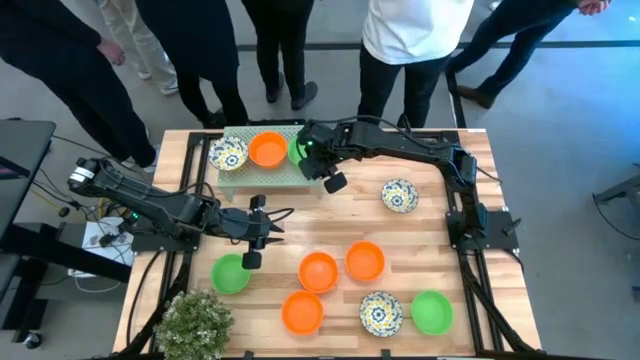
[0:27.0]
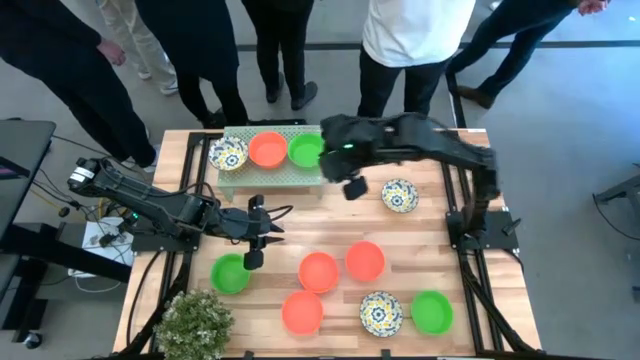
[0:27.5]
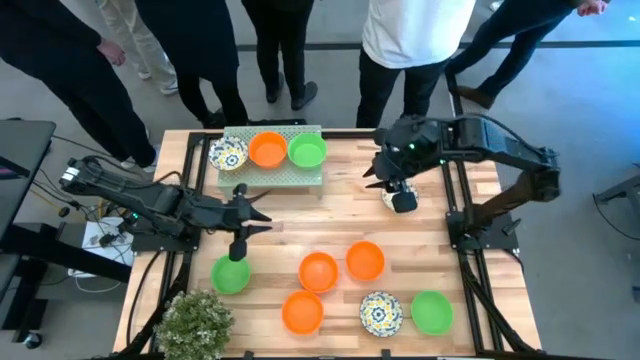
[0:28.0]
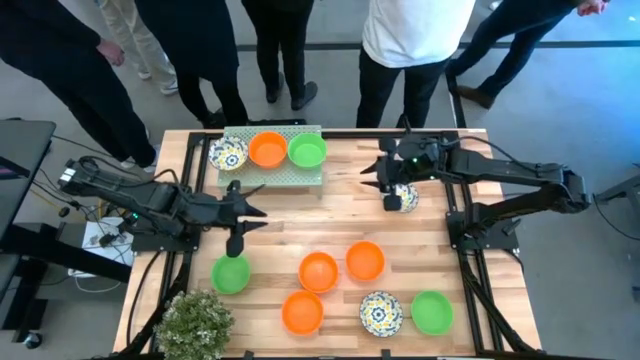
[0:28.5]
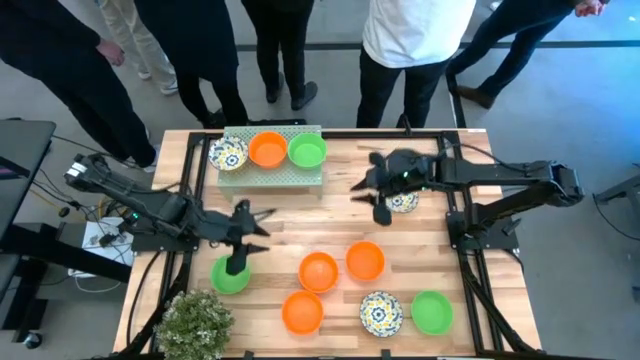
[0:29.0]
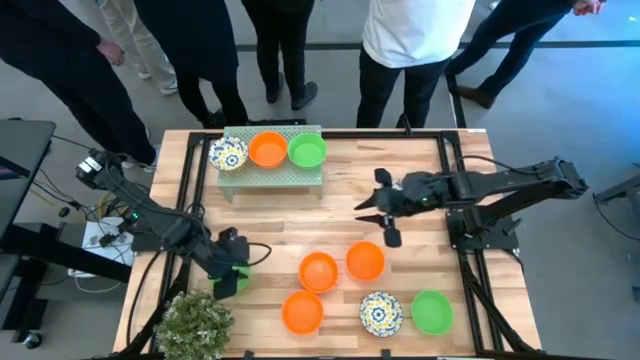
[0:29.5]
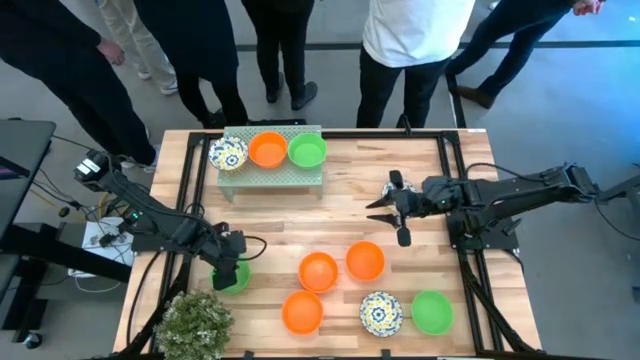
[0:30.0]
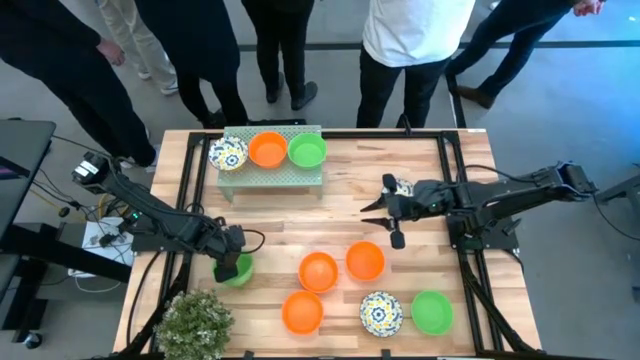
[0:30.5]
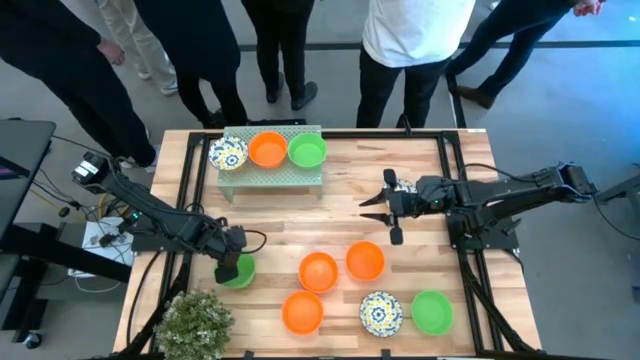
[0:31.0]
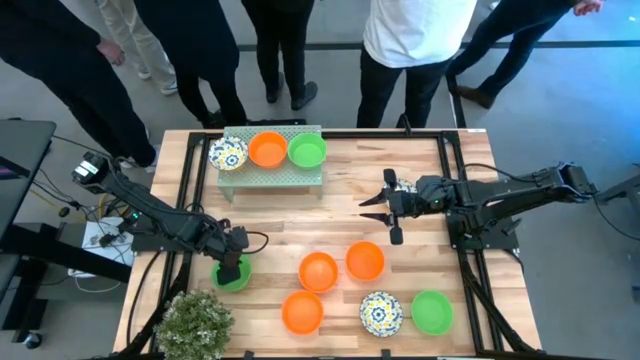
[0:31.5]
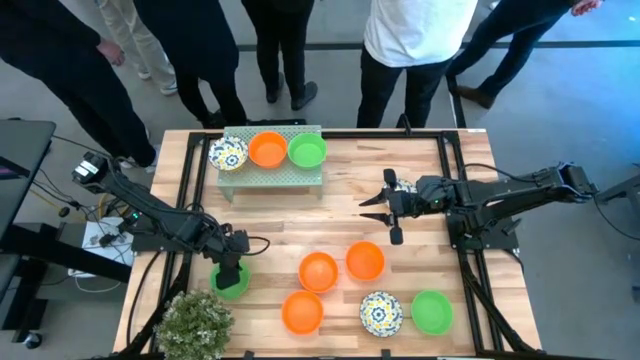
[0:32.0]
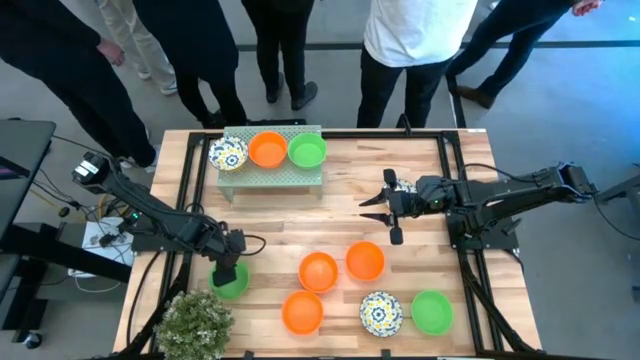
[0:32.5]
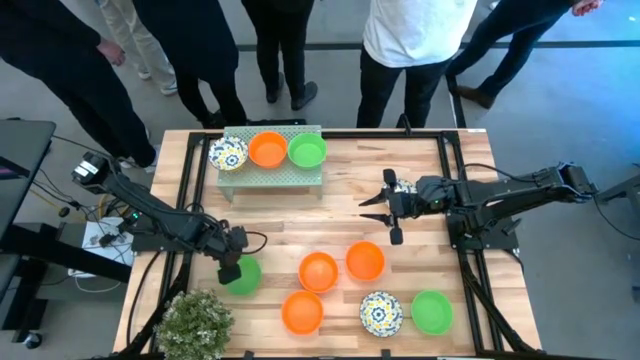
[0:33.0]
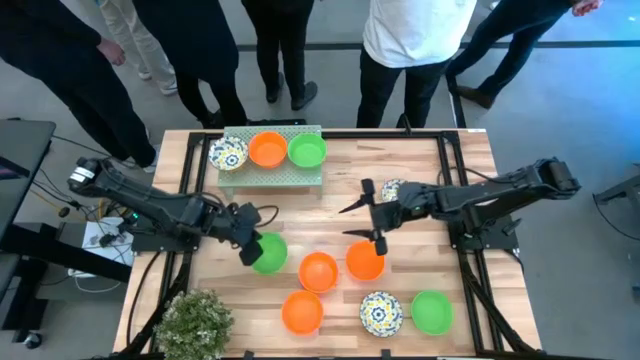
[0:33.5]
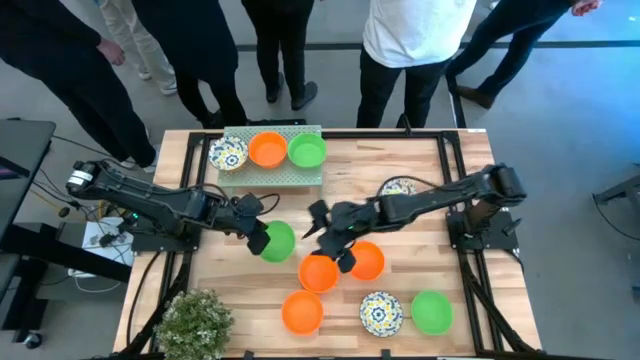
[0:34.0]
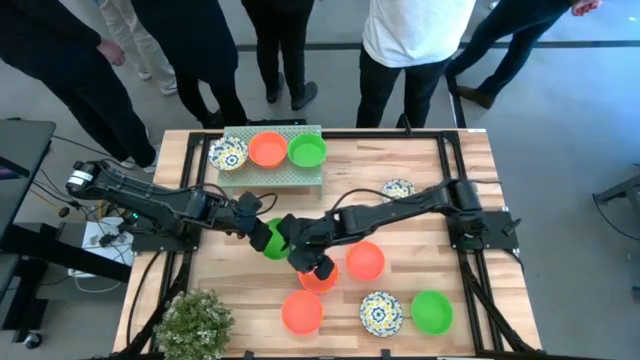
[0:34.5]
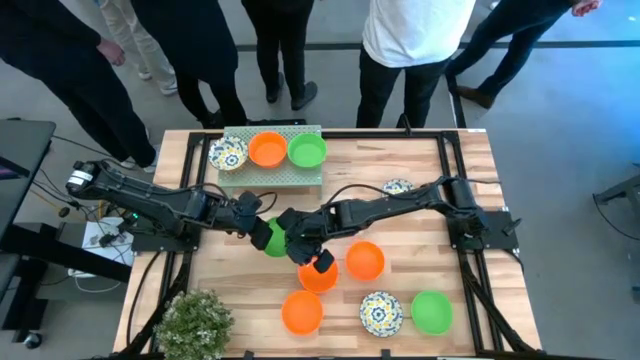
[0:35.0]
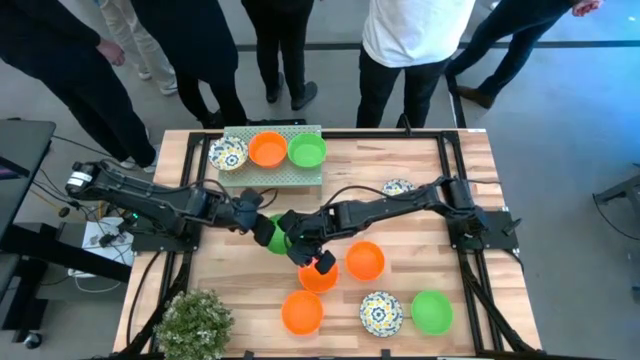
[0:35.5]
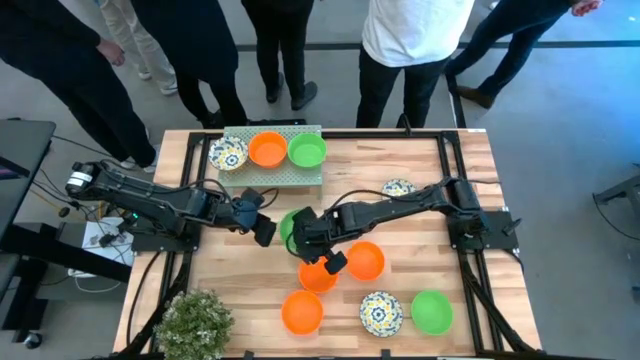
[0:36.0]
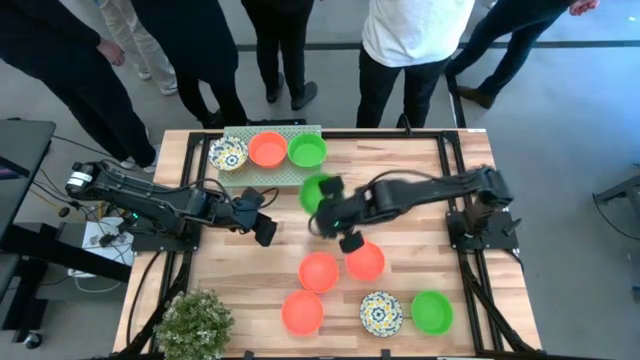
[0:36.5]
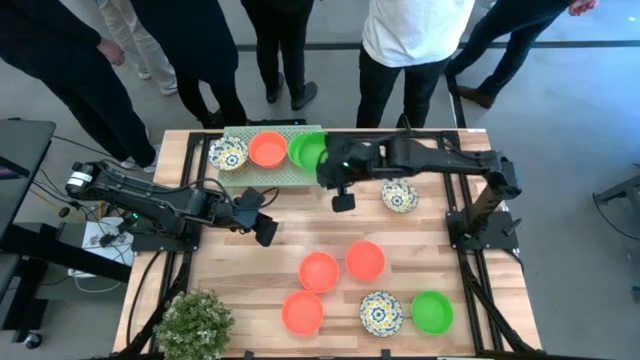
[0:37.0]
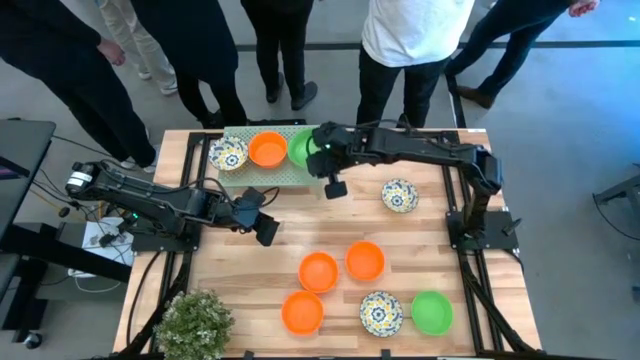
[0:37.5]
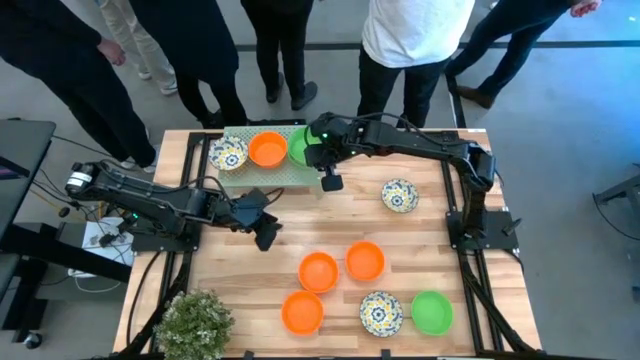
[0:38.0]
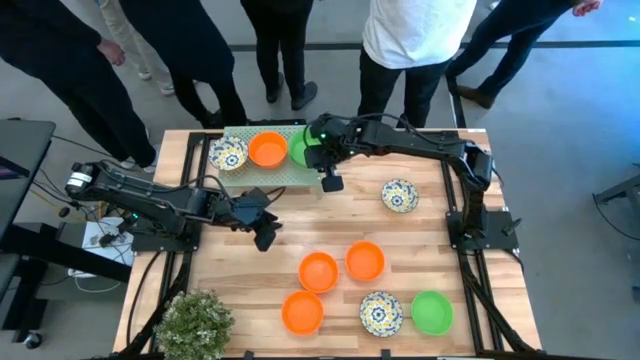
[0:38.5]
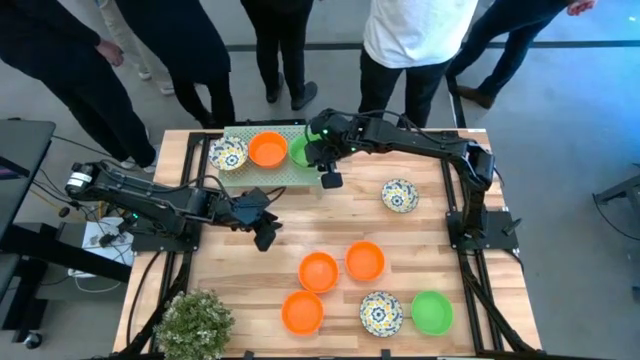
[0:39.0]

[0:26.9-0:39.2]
Task: Pick & Place Mini bowls
Stack the green bowl on top of the other green bowl on the shelf

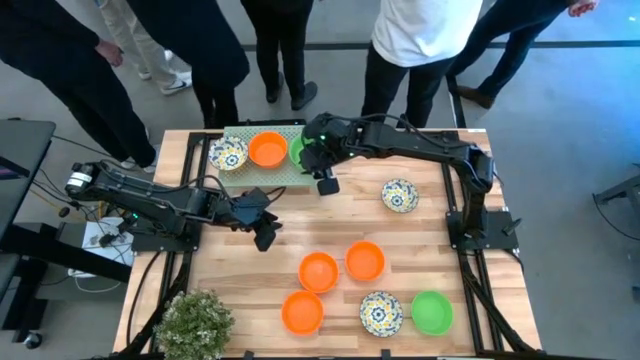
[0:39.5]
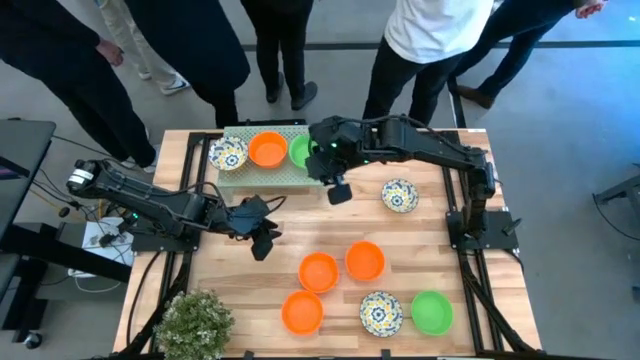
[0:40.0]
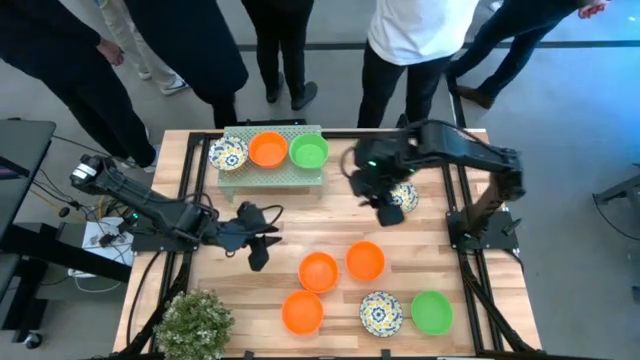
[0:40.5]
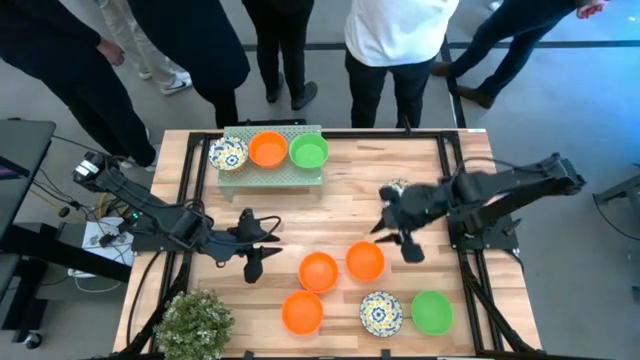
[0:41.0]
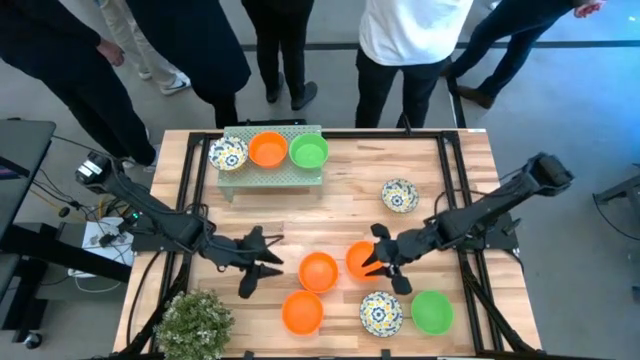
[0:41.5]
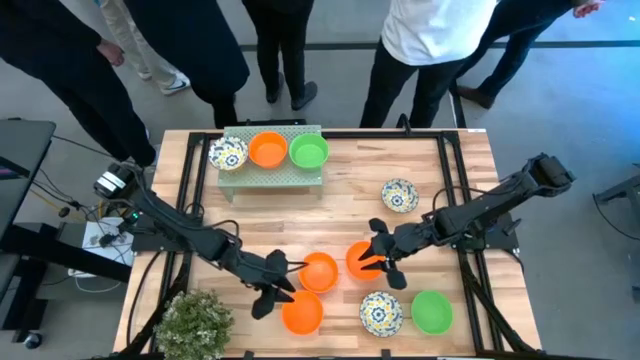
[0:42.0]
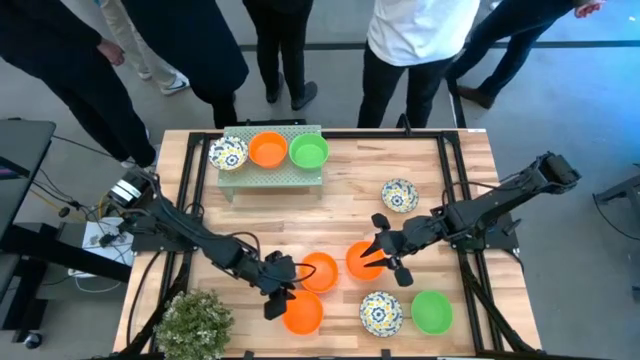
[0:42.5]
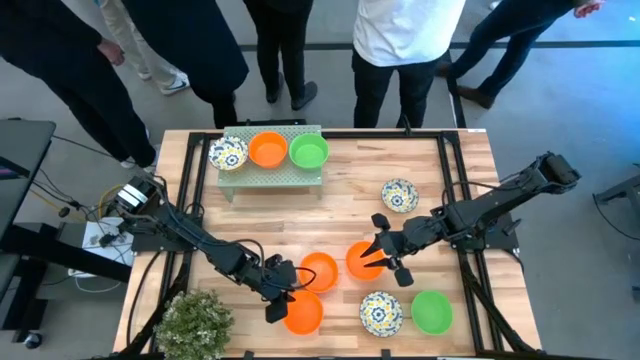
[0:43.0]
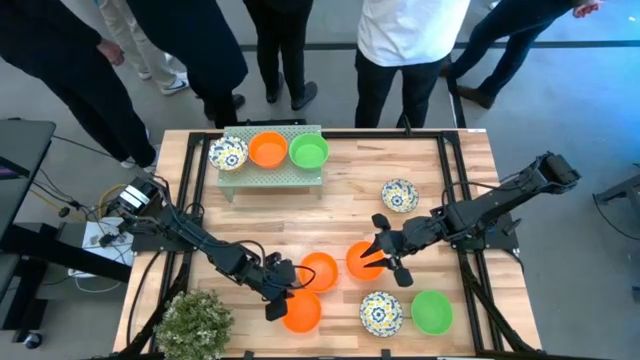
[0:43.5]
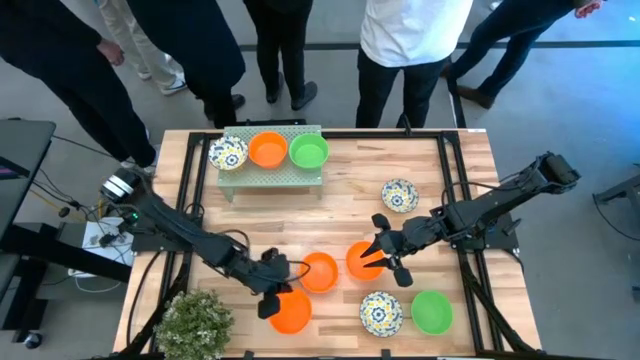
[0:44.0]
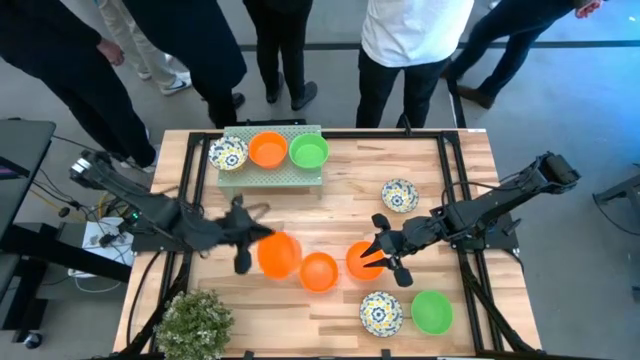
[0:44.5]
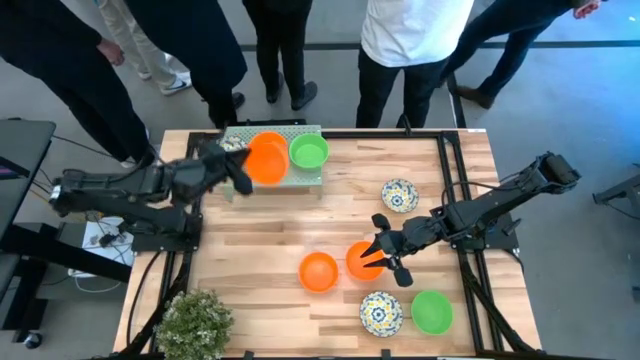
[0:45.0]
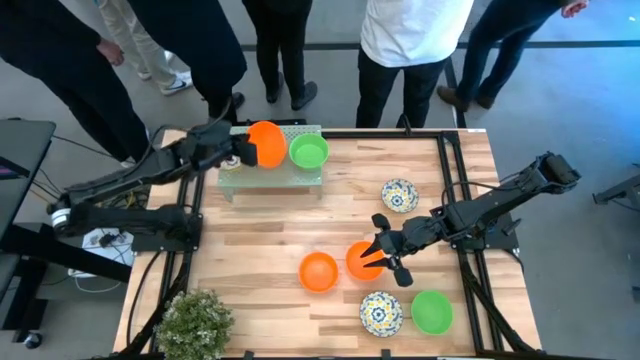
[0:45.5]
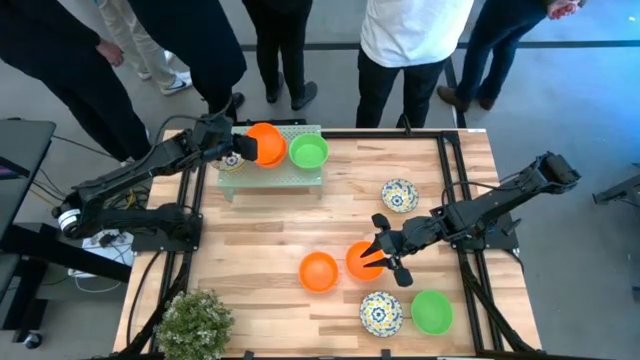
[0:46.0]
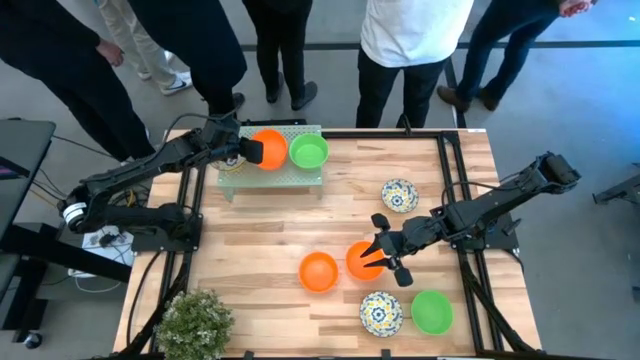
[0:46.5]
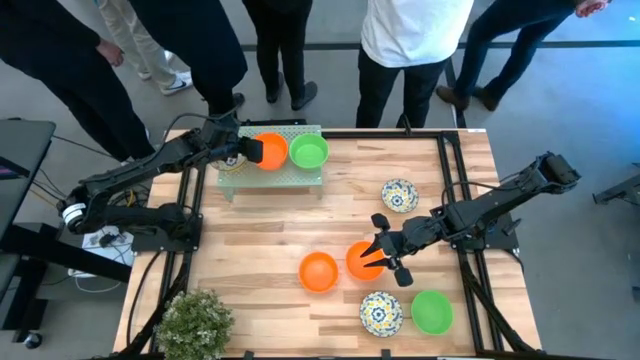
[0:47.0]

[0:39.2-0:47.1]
Stack the orange bowl on top of the other orange bowl on the shelf
